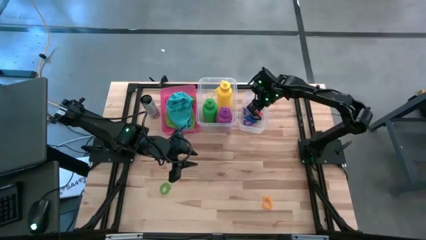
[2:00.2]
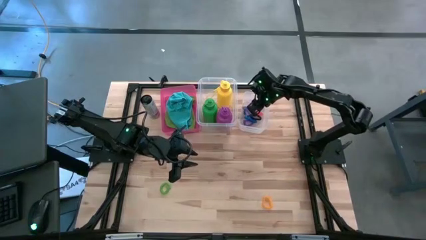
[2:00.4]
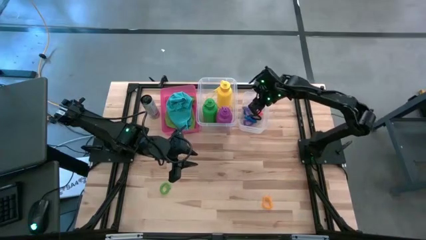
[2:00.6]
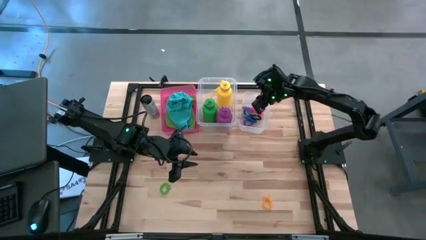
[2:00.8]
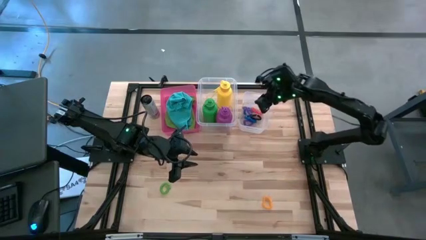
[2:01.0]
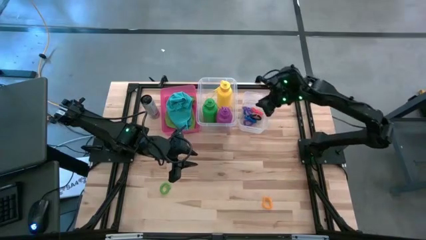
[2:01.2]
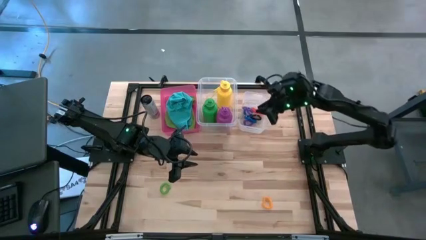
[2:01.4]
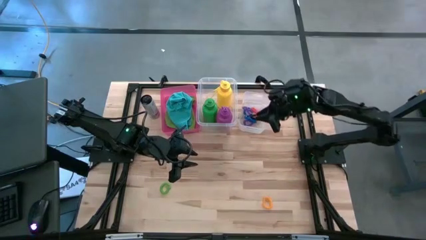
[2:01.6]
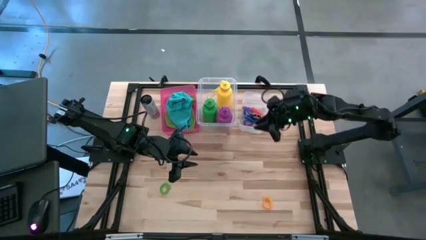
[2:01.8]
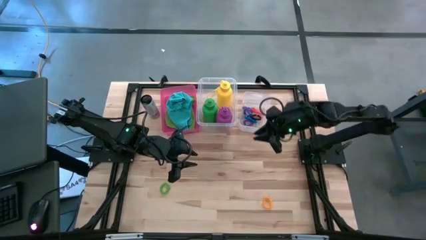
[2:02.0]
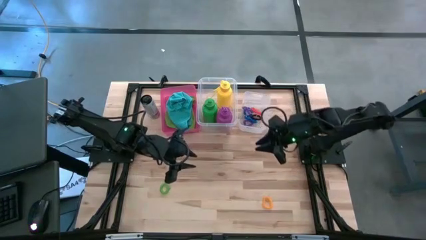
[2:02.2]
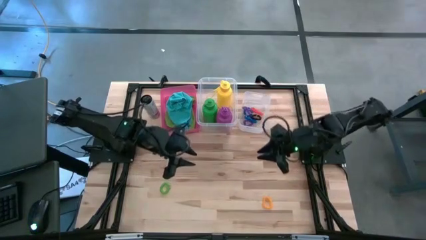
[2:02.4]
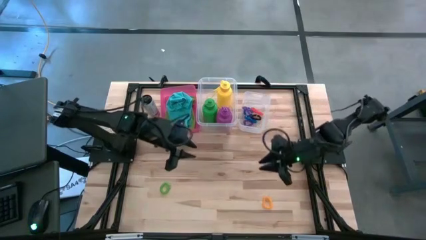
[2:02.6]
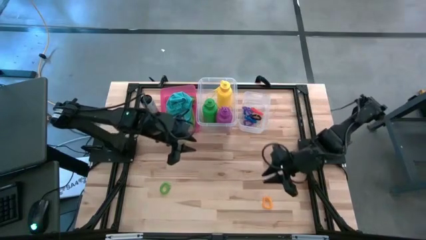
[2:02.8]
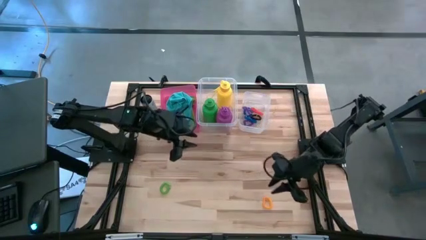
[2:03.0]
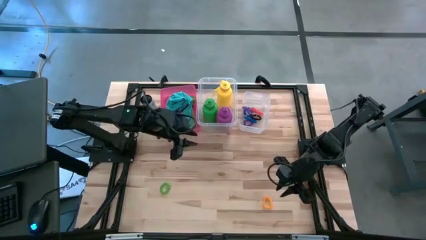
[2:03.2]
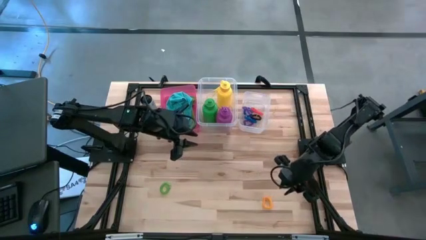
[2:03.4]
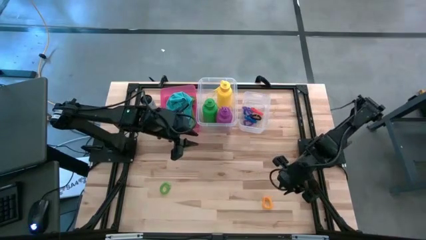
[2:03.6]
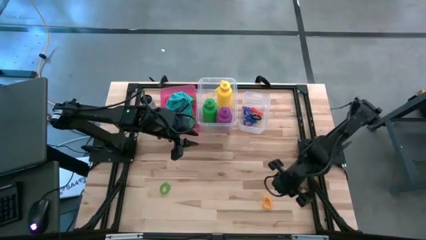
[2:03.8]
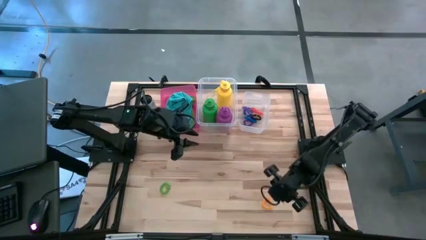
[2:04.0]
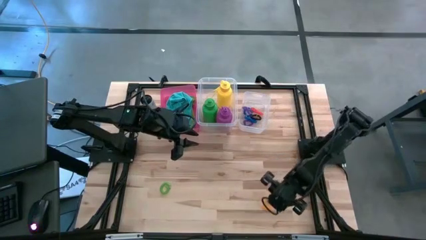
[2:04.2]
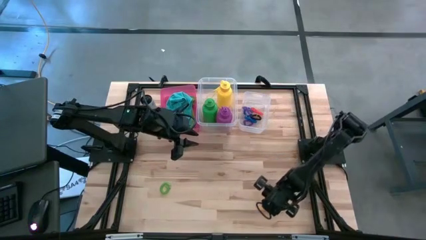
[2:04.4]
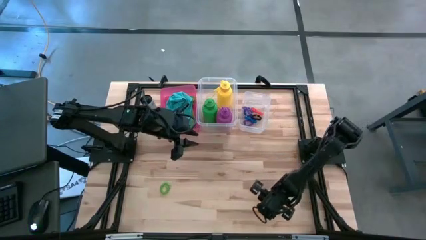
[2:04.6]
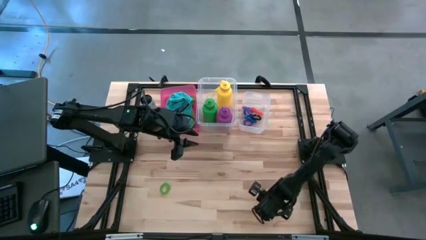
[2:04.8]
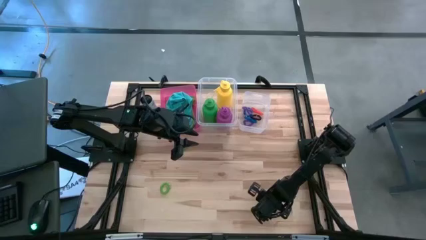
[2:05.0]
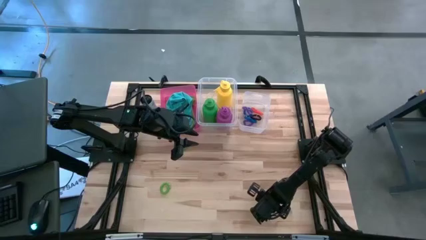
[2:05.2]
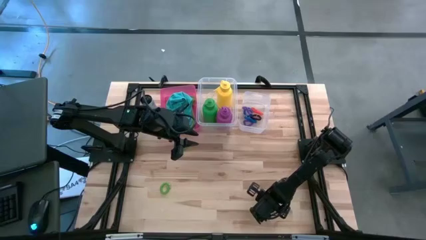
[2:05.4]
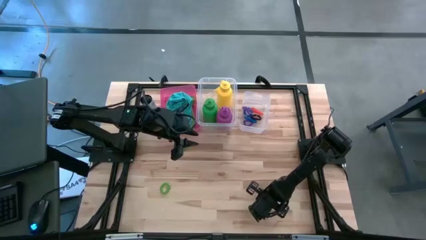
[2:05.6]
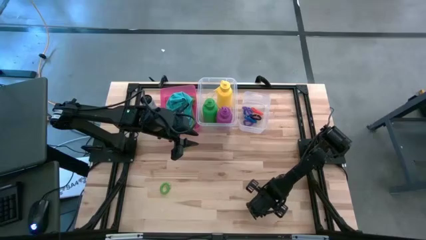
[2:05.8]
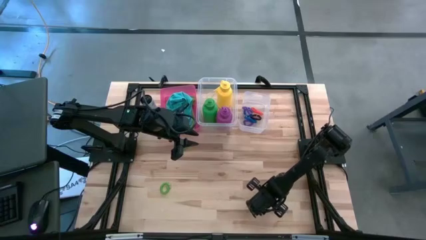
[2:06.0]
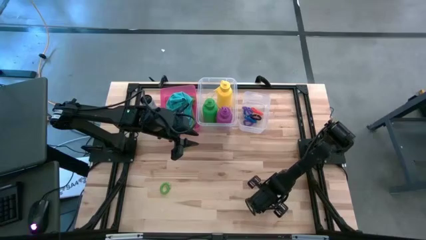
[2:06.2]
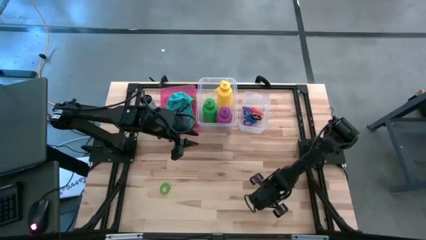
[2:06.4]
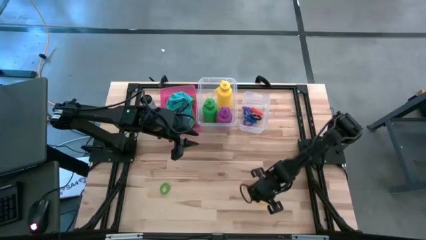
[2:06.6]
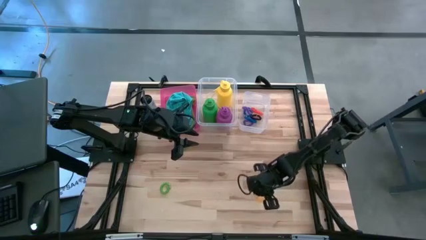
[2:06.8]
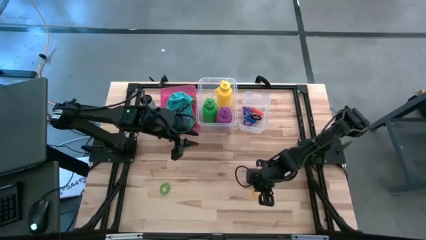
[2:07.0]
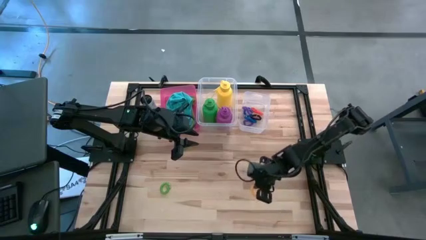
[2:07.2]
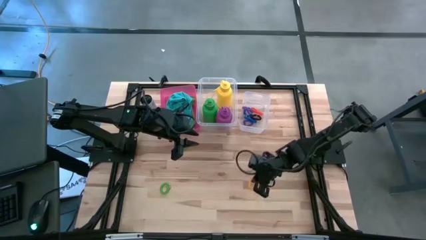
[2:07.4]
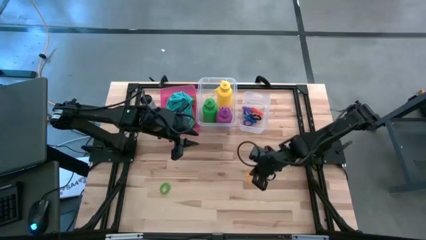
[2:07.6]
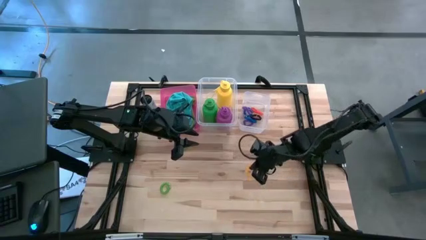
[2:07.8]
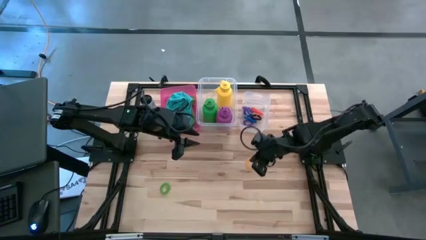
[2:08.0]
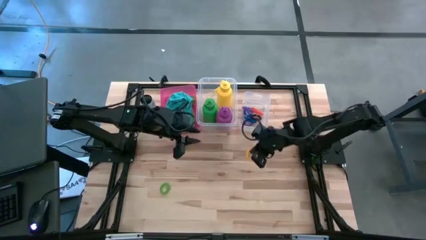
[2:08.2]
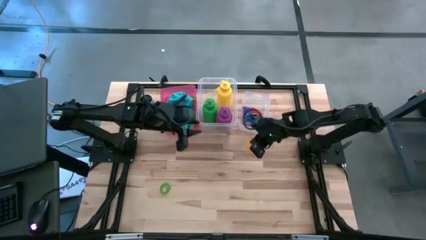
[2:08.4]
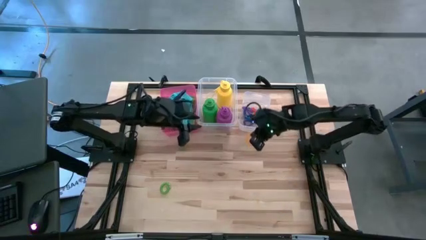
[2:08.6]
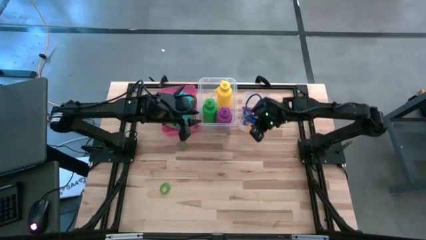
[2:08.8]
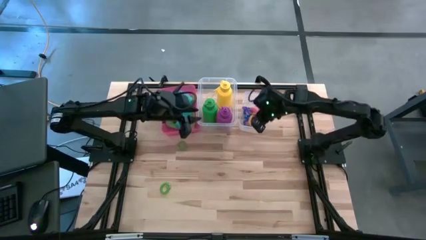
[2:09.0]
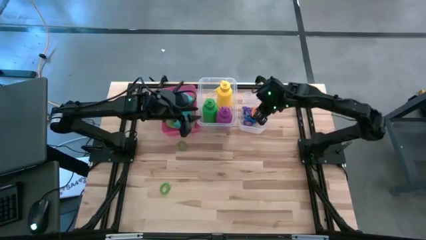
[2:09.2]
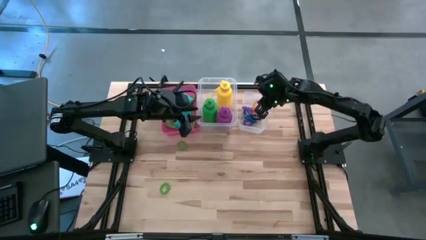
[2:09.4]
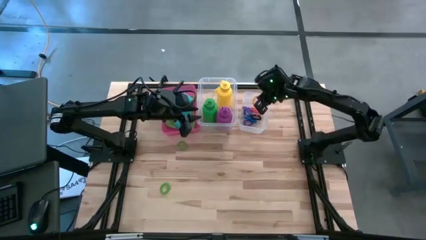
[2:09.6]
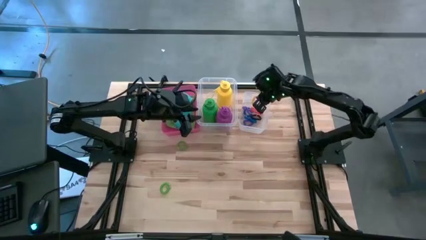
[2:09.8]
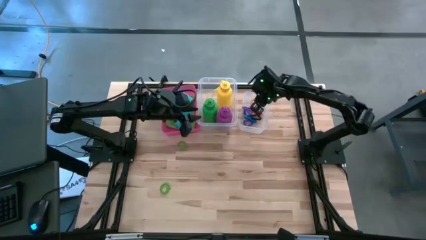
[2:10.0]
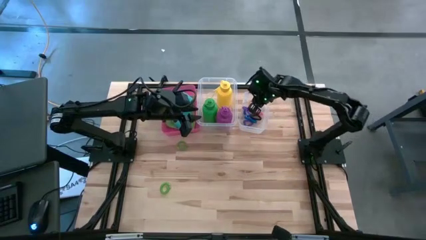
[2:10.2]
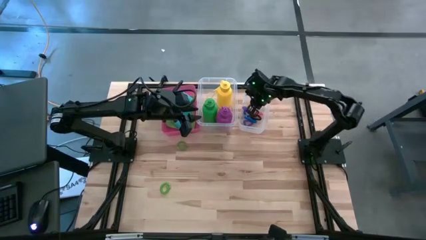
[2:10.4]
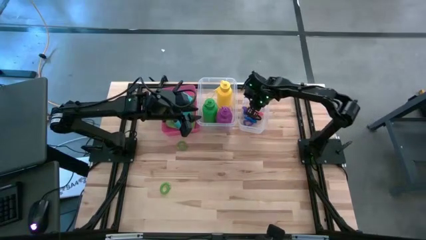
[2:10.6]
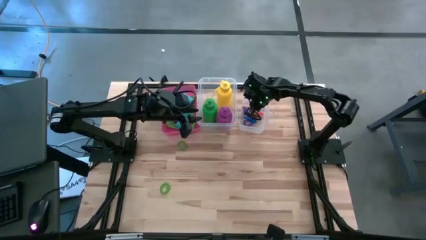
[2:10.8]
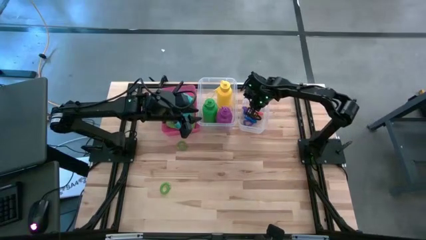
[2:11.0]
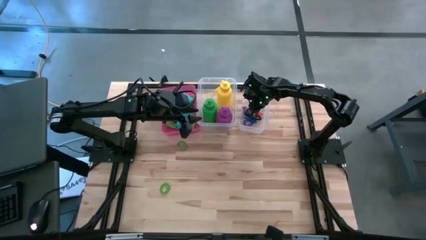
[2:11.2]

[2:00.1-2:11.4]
Task: Pick & Place Sports Items
Put the yellow spring keychain into the right transparent bin

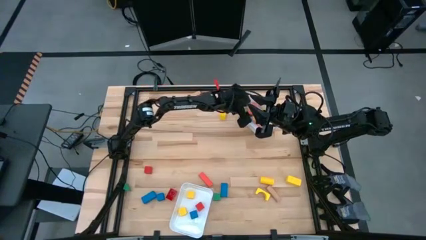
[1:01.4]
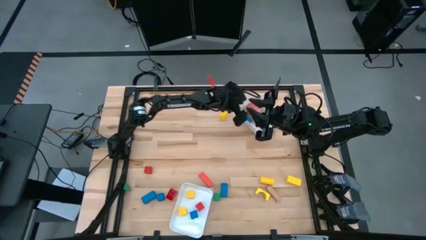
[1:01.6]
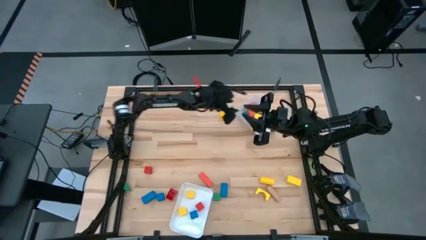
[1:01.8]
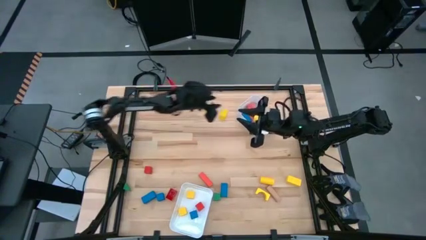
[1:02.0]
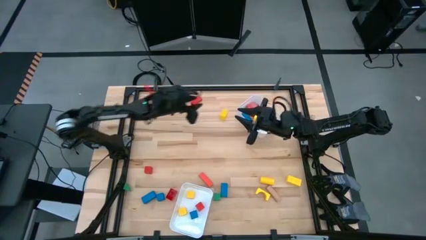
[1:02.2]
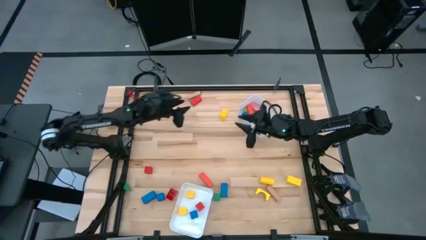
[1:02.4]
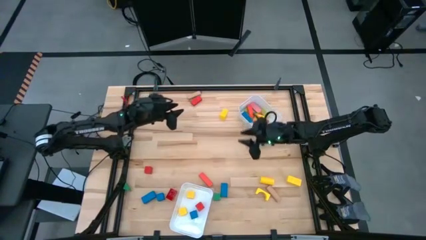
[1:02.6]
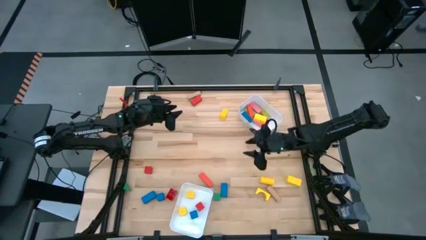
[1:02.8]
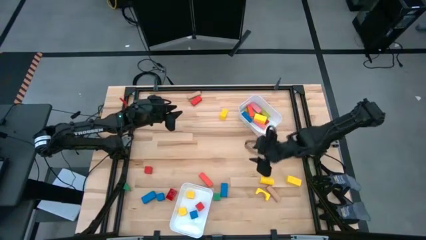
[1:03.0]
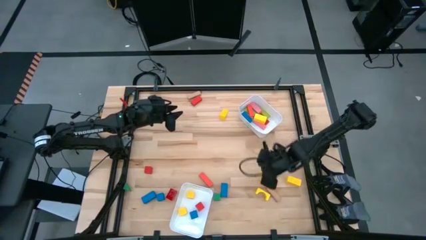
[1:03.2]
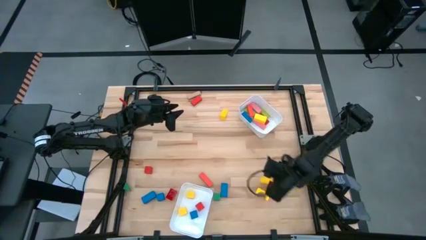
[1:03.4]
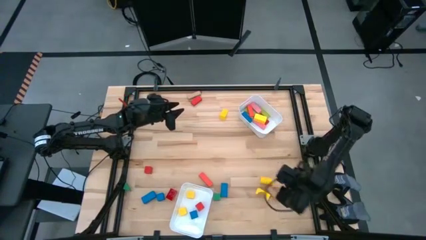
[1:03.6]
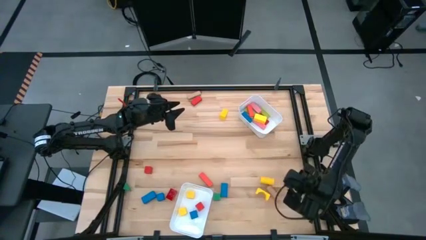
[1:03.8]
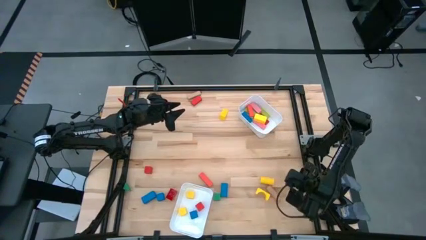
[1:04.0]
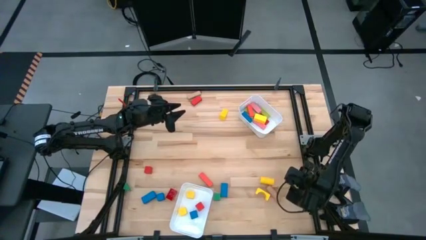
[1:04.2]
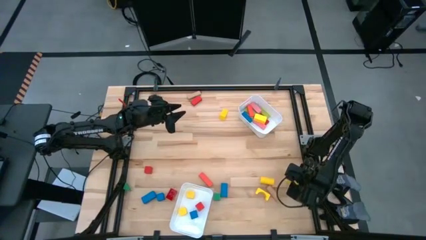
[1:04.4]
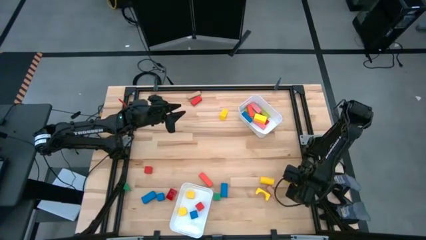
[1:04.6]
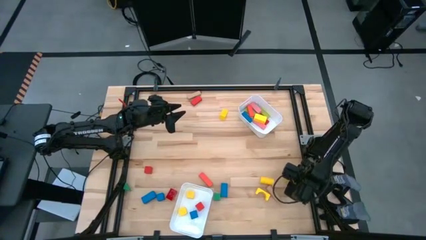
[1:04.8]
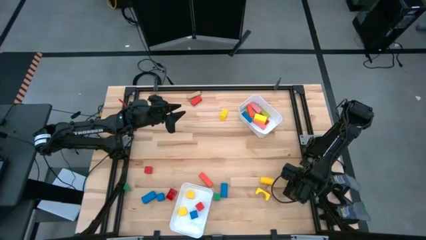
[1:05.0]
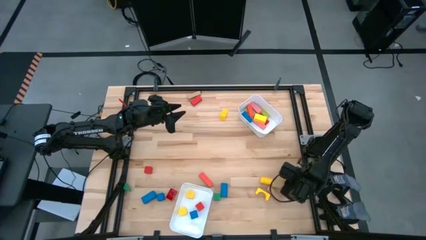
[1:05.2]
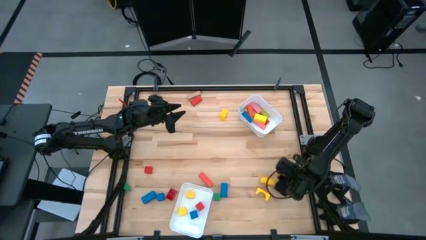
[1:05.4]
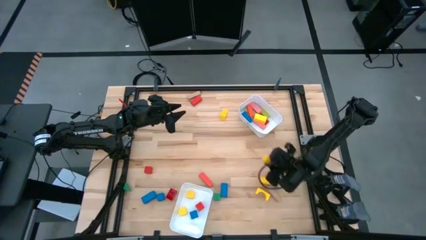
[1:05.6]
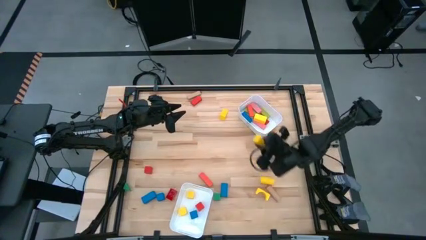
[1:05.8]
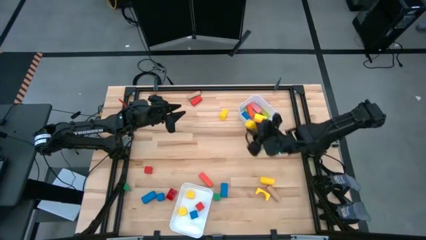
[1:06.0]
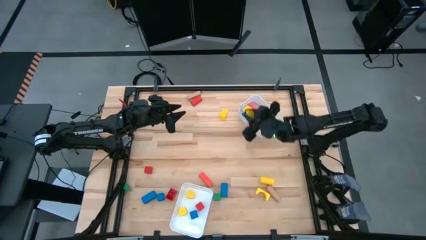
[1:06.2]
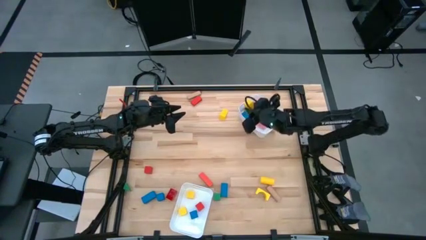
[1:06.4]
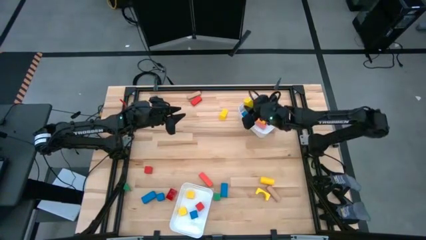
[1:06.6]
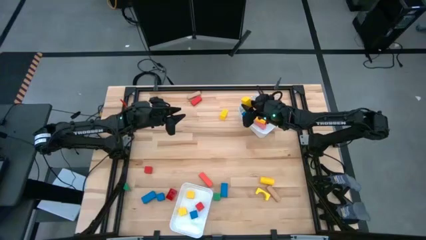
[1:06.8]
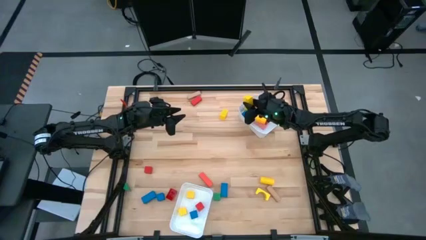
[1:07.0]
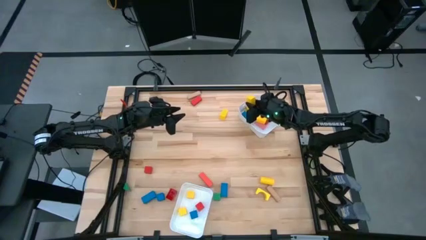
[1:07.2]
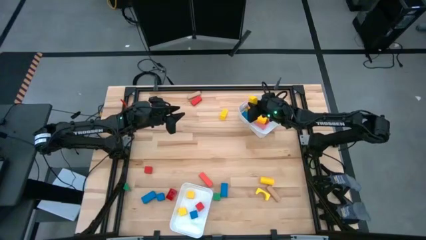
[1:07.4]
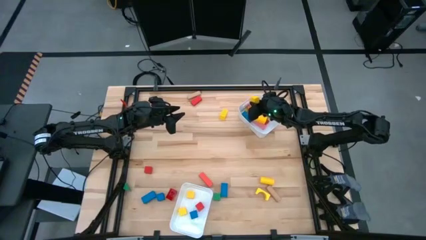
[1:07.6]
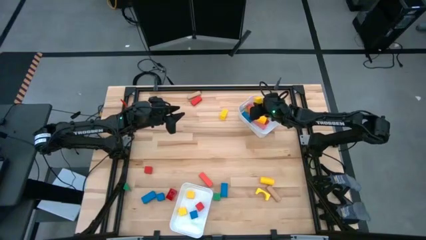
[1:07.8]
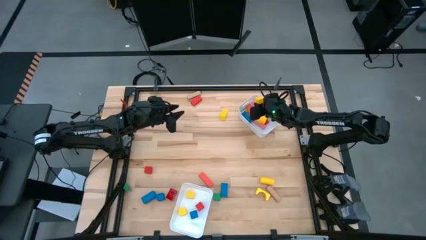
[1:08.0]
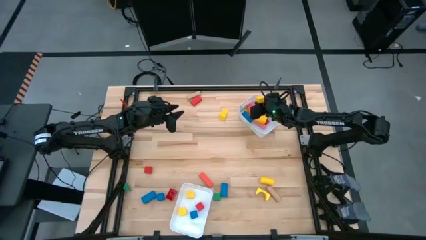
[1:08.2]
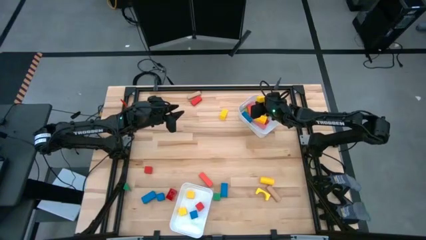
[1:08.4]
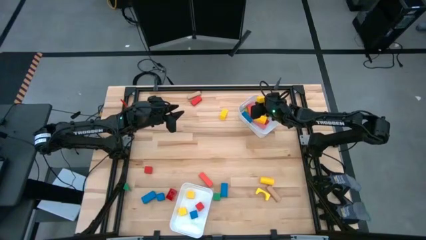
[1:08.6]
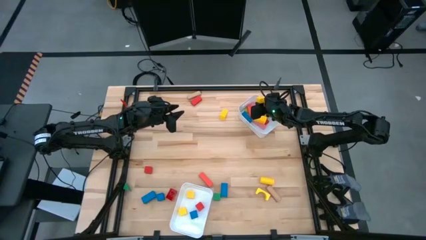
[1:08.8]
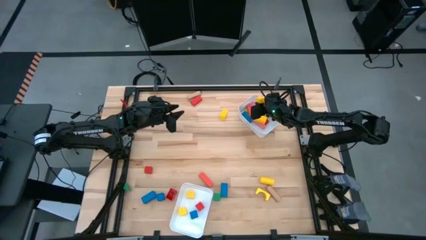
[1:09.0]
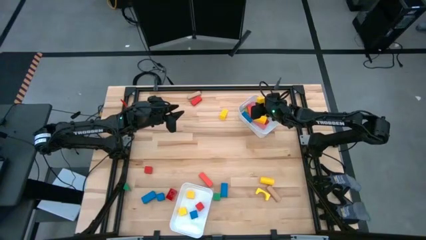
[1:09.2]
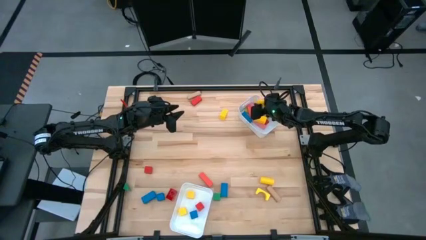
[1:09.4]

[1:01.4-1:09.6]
Task: Sort blocks by size
Put the yellow rectangle block into the top white bin
